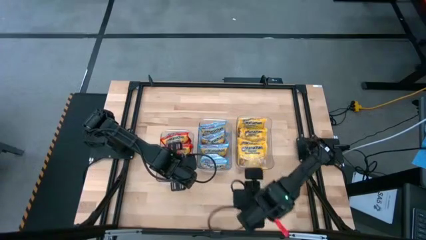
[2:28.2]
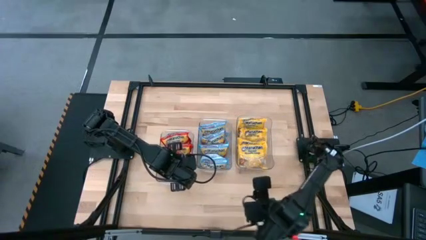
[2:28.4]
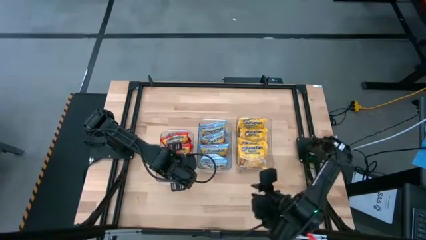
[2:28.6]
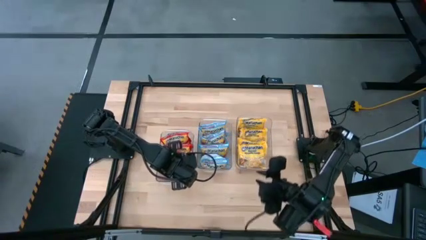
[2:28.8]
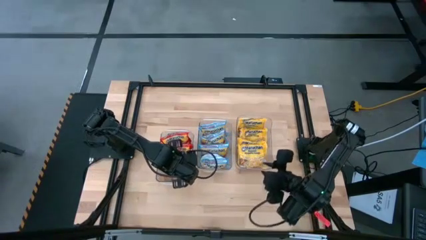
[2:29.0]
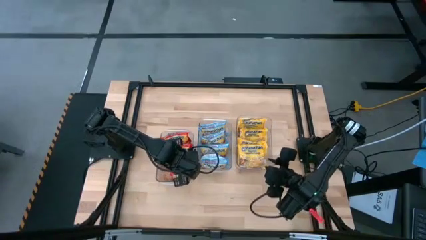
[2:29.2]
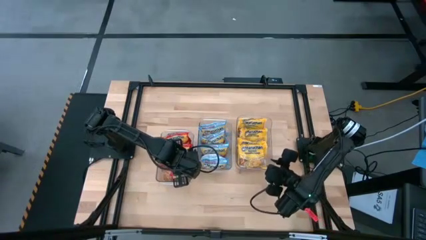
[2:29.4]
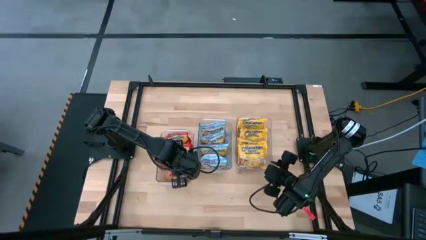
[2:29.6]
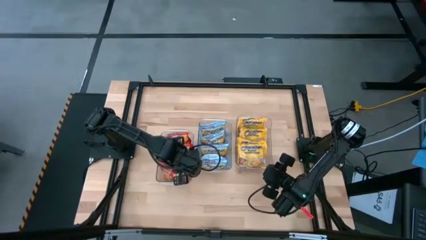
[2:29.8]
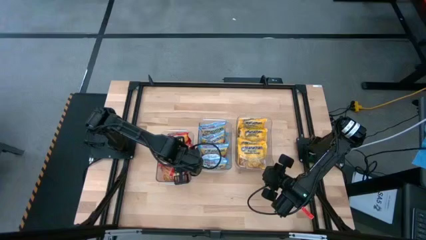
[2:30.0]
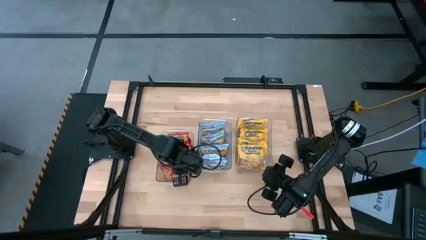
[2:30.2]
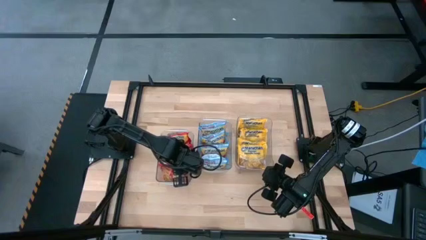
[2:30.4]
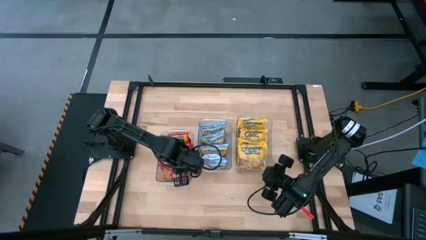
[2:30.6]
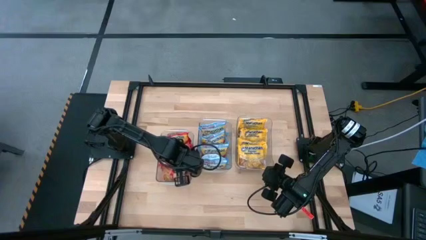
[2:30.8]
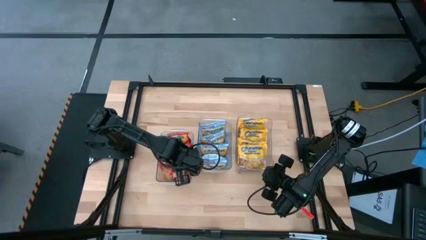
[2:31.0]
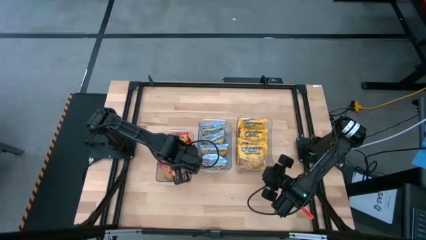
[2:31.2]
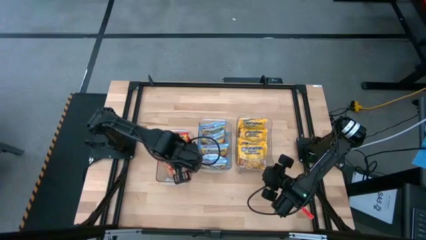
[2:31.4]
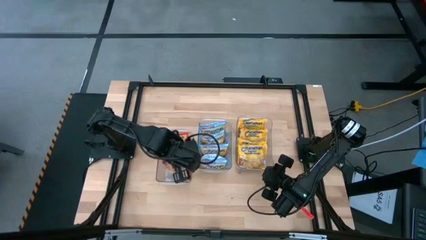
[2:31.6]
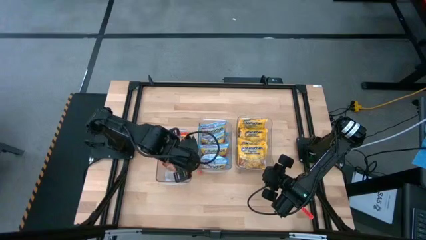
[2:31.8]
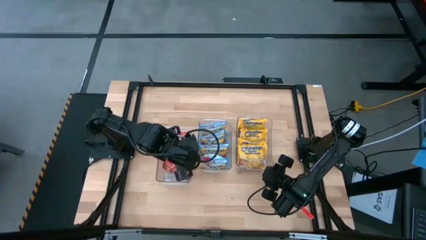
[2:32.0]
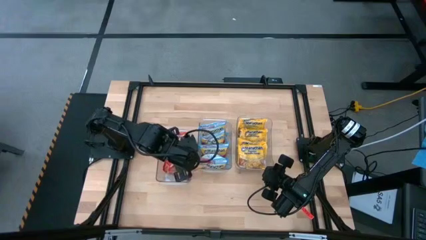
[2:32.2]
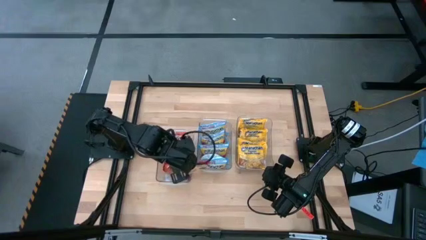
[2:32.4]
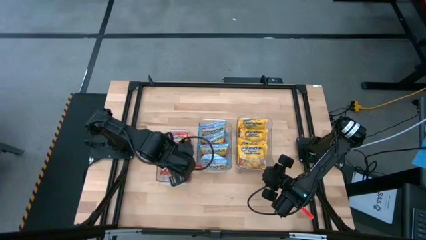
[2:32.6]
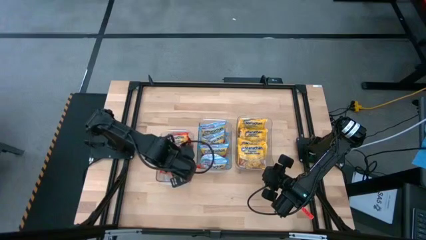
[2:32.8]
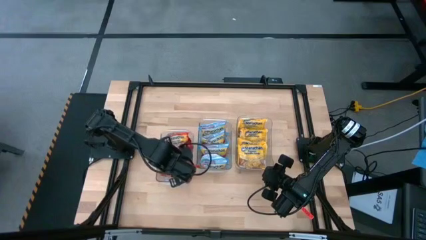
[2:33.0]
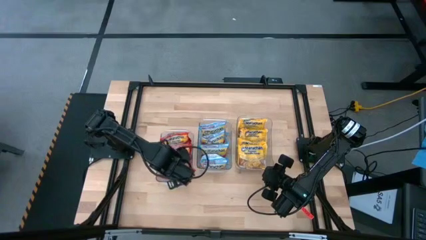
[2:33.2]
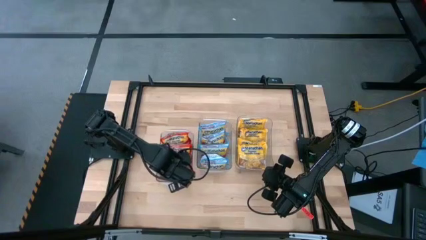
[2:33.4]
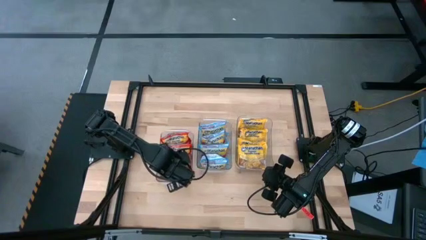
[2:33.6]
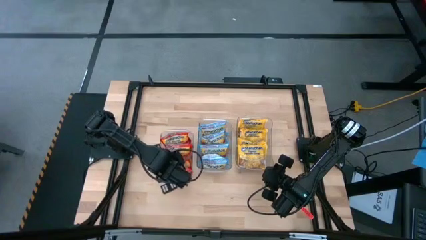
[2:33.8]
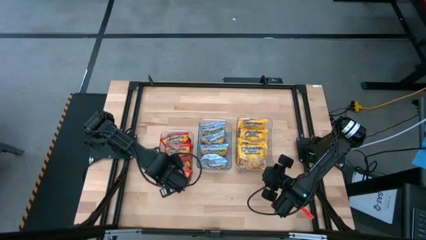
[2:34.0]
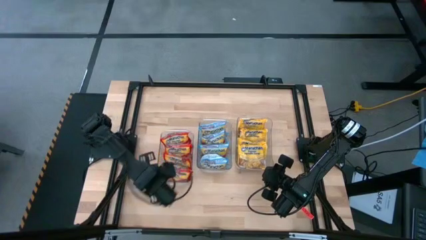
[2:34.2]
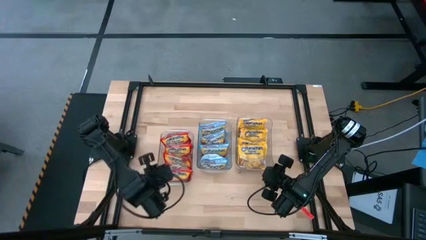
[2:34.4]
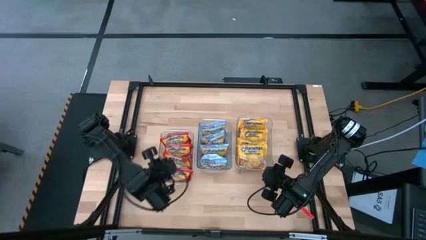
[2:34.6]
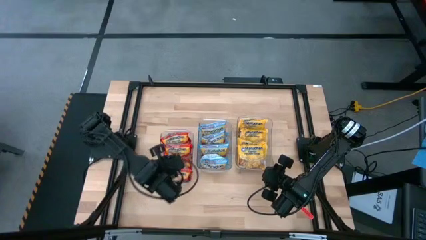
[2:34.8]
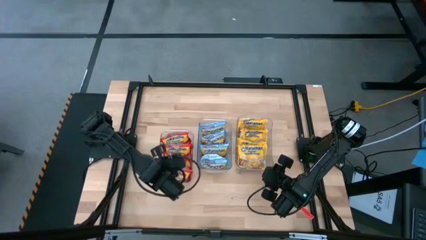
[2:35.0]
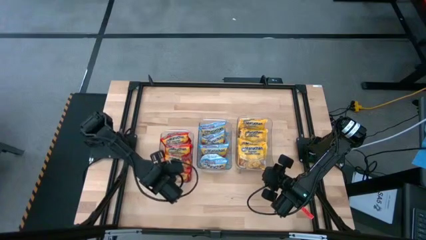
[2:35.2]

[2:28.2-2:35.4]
Task: Sort Maruchan noodles
Put the red noodle pack into the left transparent bin

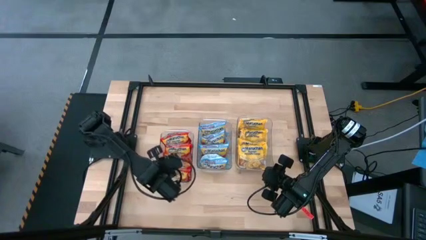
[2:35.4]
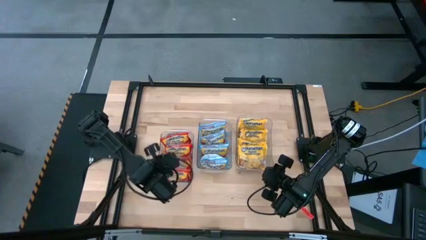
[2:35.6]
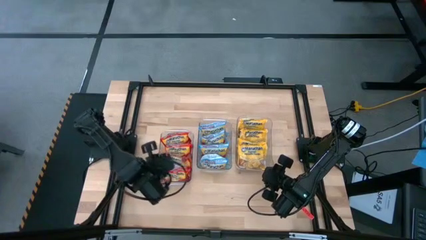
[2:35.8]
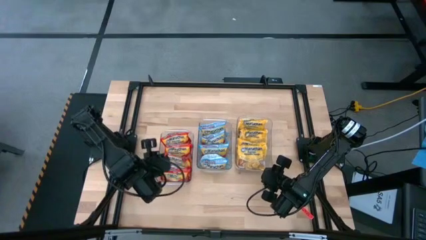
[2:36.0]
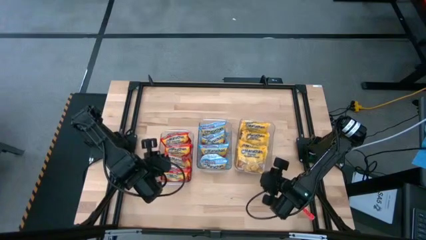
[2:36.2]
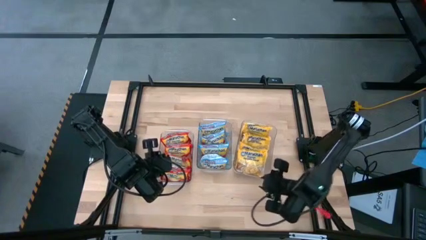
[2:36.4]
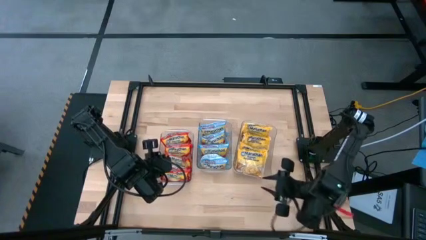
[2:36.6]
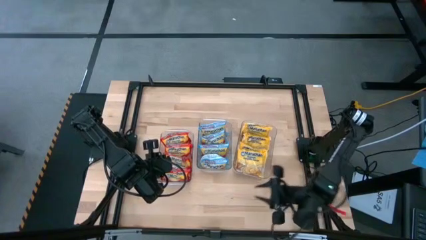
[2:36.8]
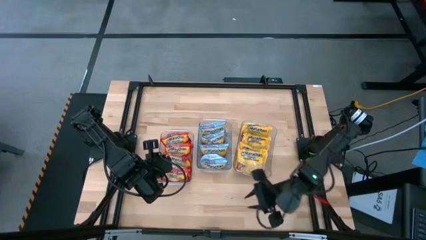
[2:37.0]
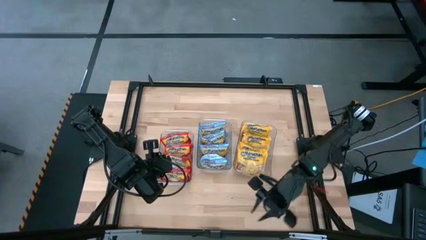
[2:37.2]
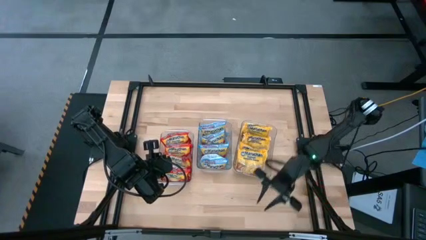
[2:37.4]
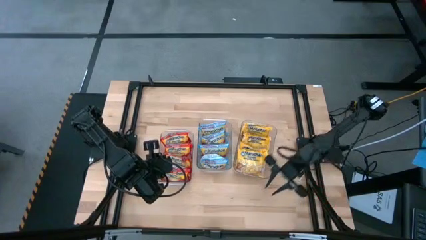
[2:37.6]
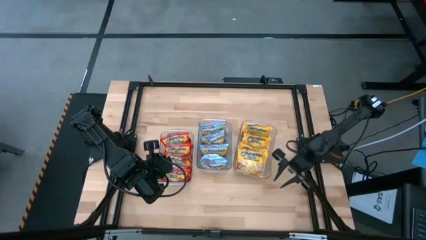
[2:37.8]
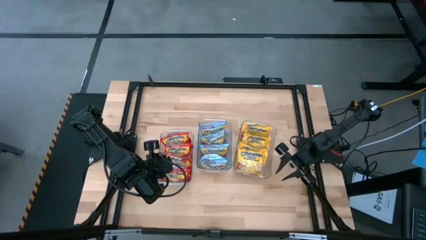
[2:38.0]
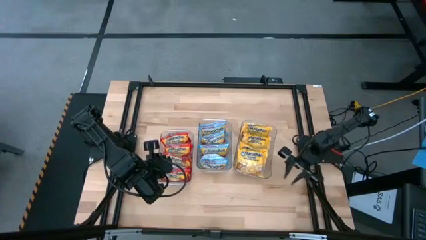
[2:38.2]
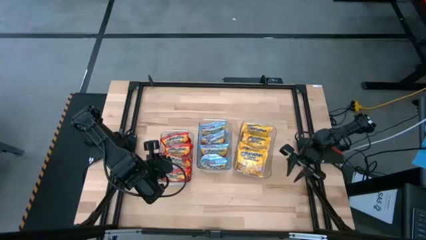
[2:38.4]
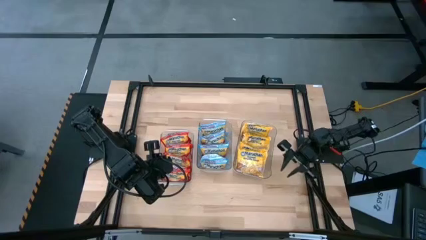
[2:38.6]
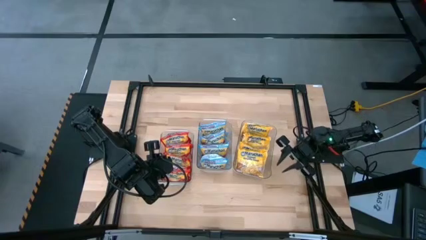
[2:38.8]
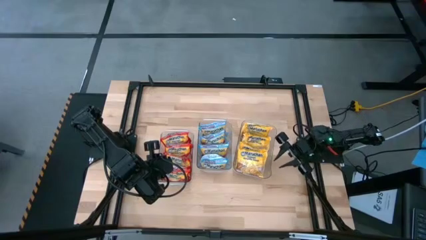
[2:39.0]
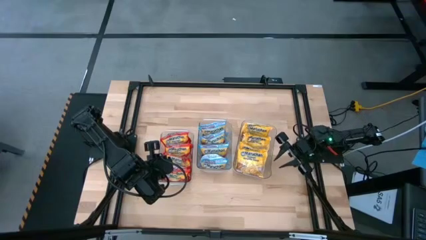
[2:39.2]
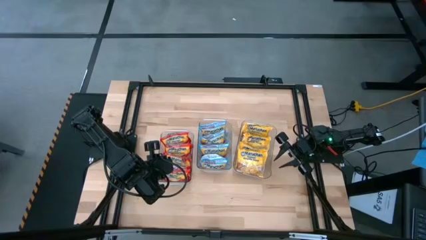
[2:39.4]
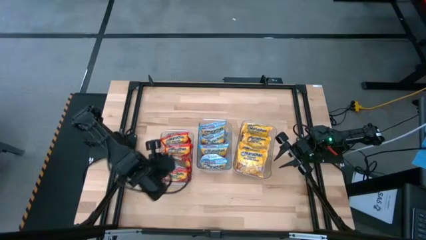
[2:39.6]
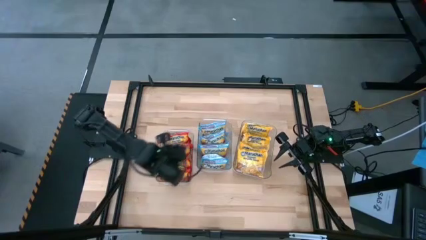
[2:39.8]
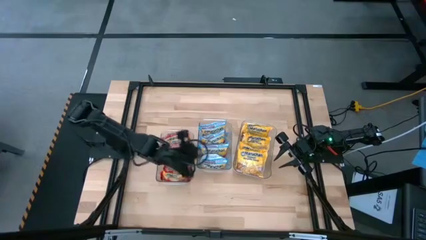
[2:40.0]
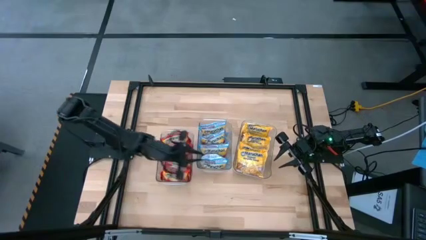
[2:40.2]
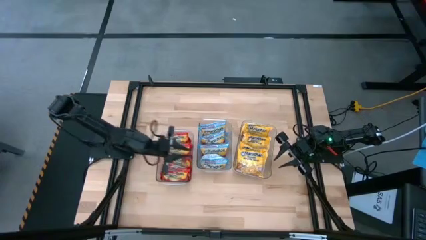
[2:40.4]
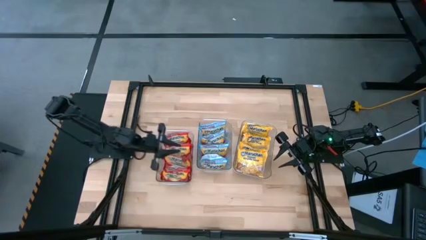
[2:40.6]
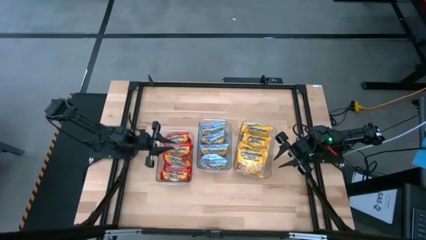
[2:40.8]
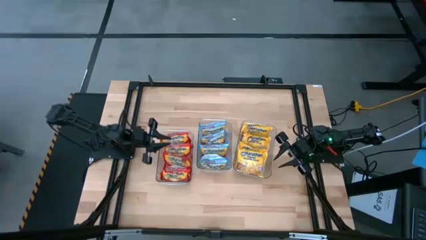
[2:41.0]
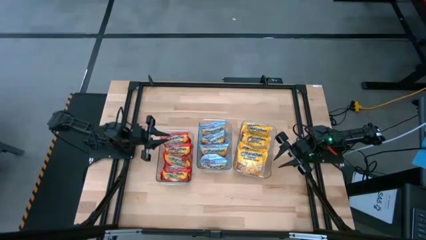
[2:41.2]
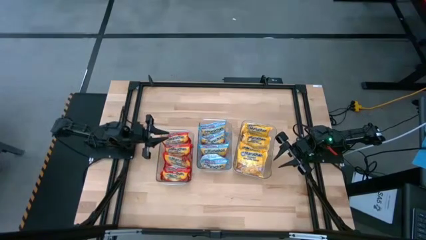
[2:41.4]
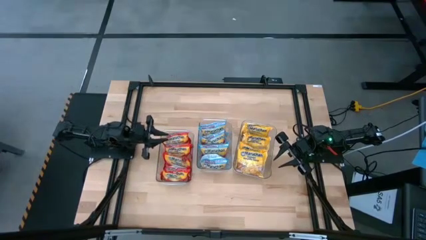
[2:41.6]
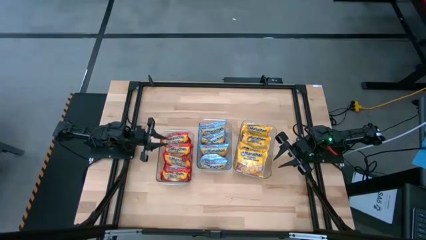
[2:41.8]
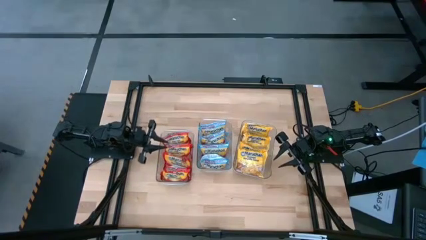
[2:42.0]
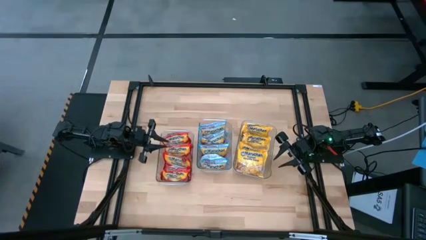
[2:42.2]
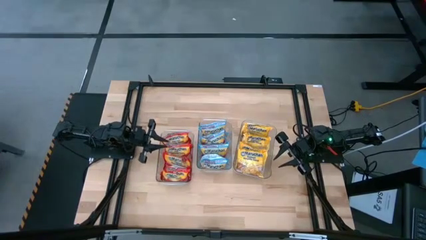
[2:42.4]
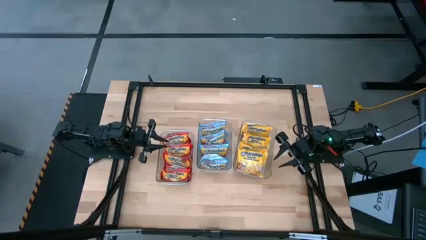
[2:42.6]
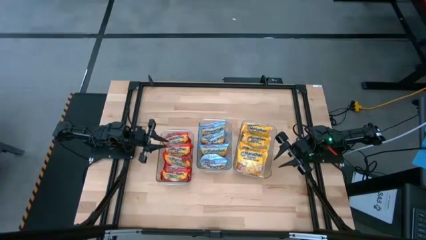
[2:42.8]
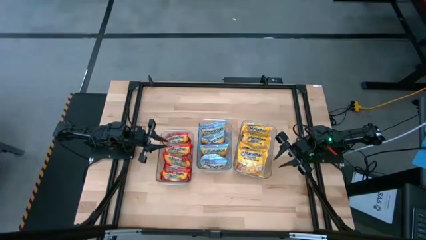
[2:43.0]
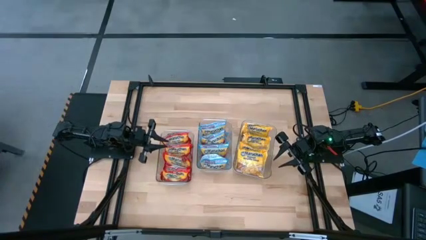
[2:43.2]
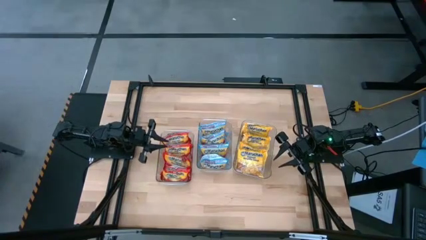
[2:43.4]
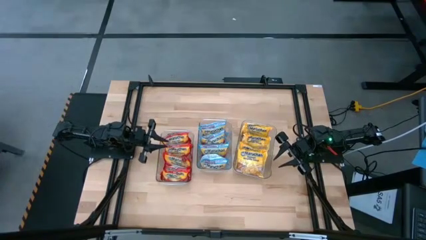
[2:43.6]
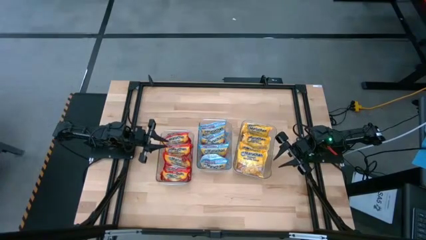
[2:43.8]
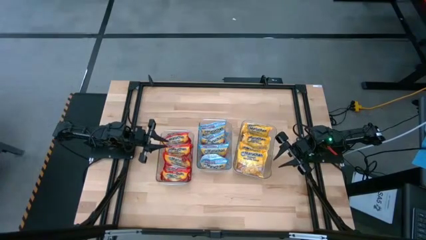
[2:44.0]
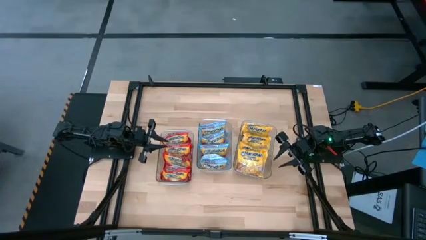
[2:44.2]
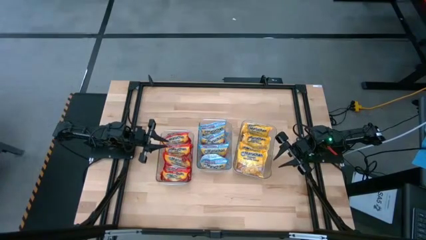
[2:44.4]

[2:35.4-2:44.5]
Return to Home Position
